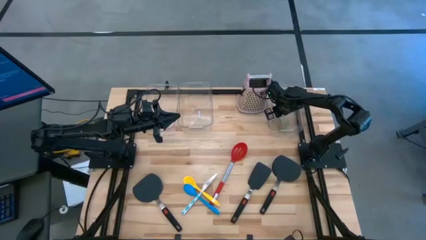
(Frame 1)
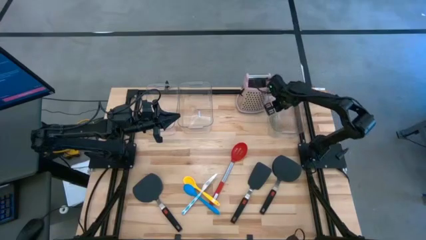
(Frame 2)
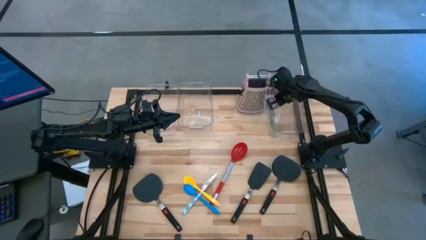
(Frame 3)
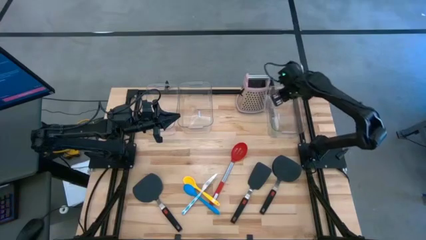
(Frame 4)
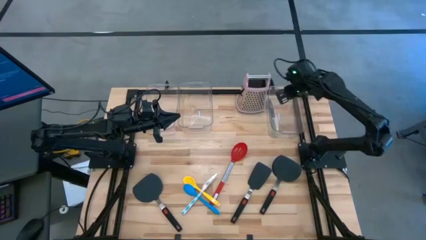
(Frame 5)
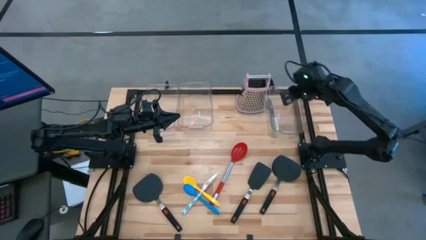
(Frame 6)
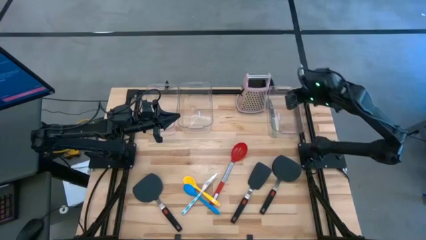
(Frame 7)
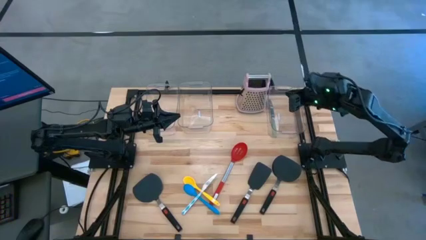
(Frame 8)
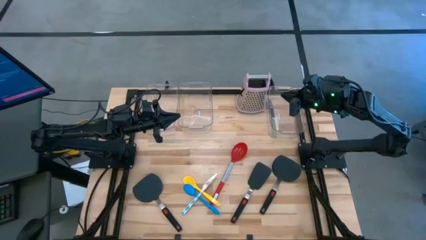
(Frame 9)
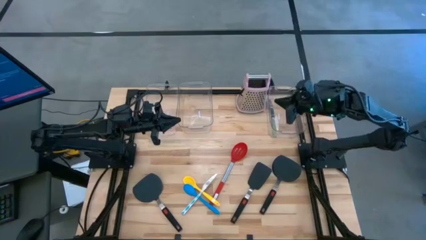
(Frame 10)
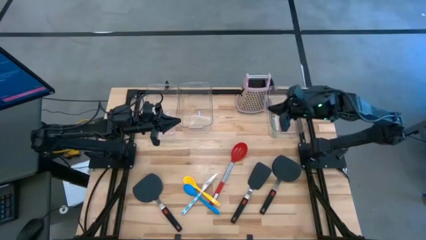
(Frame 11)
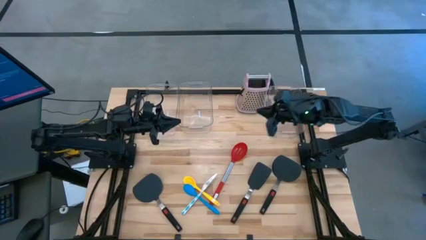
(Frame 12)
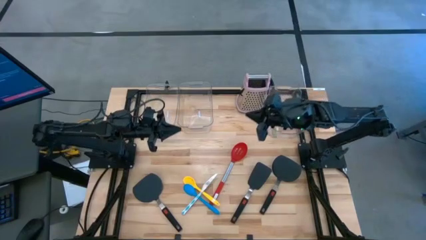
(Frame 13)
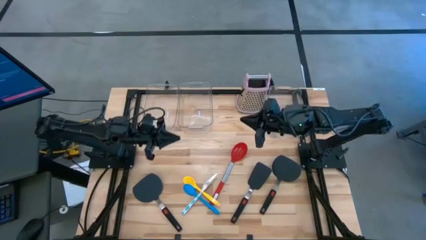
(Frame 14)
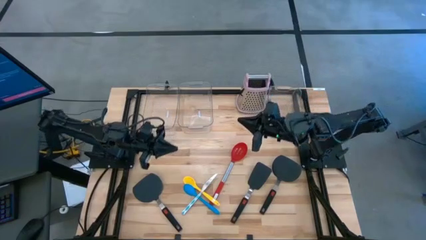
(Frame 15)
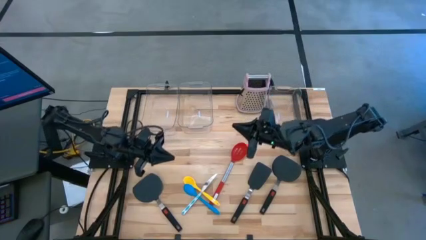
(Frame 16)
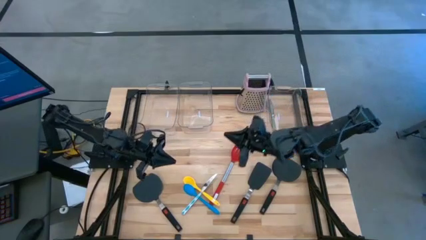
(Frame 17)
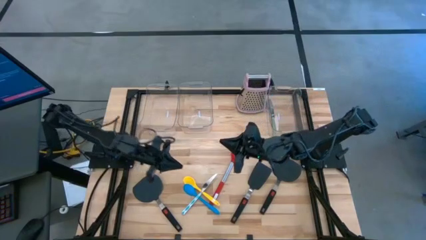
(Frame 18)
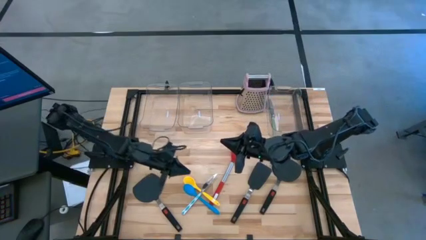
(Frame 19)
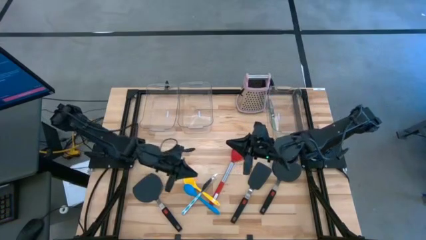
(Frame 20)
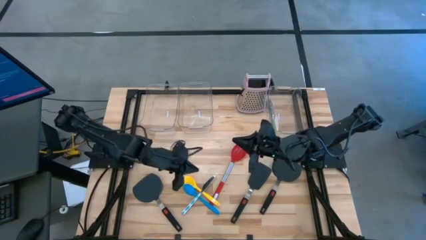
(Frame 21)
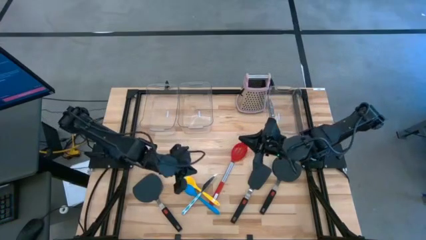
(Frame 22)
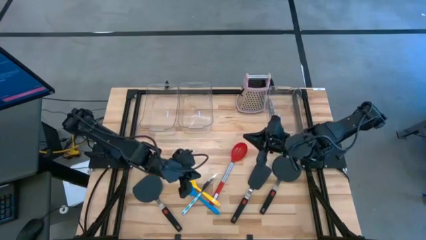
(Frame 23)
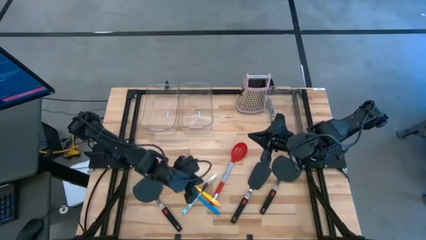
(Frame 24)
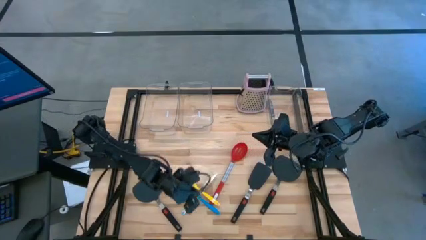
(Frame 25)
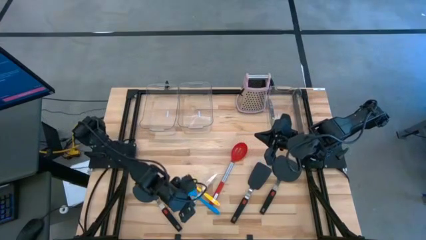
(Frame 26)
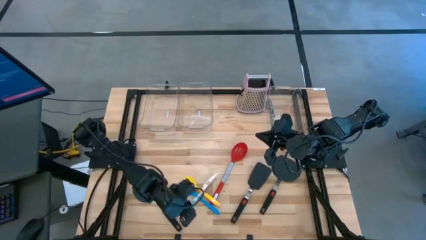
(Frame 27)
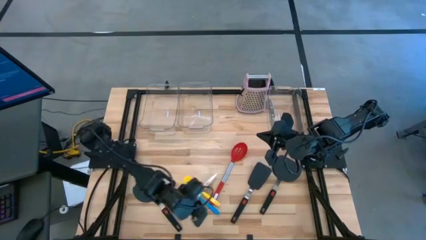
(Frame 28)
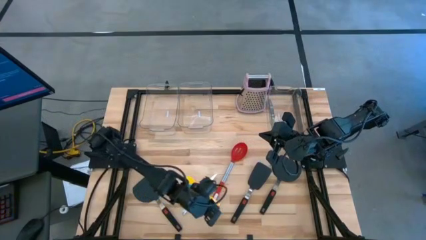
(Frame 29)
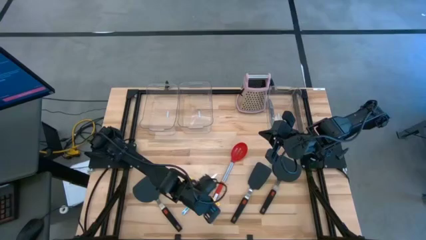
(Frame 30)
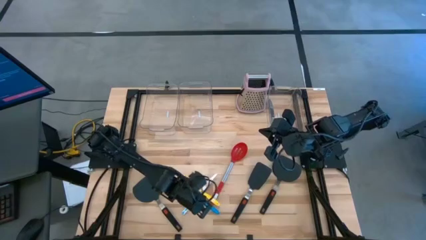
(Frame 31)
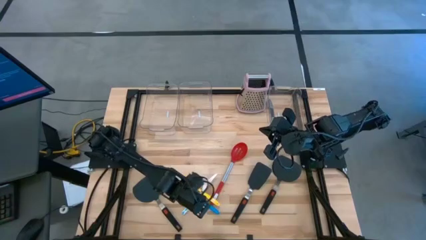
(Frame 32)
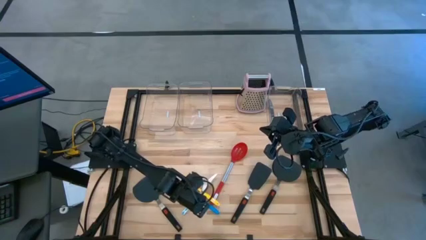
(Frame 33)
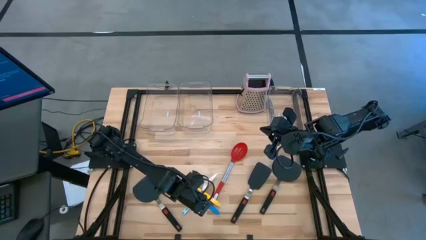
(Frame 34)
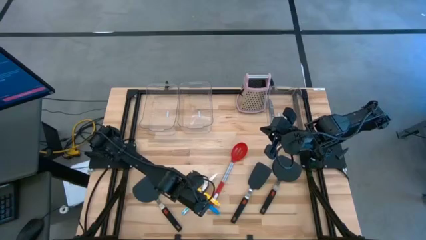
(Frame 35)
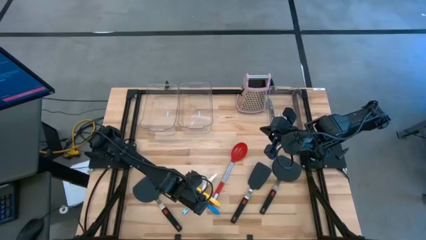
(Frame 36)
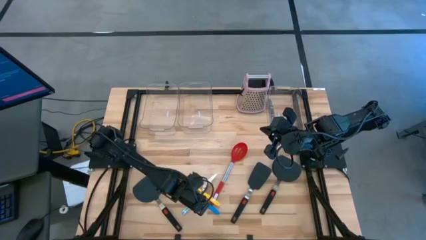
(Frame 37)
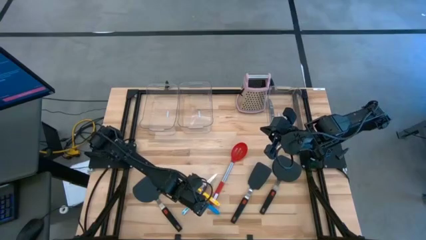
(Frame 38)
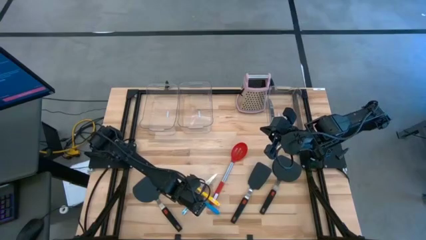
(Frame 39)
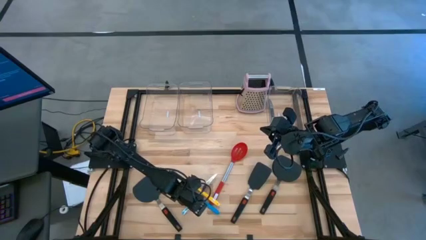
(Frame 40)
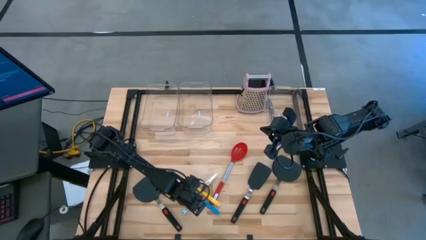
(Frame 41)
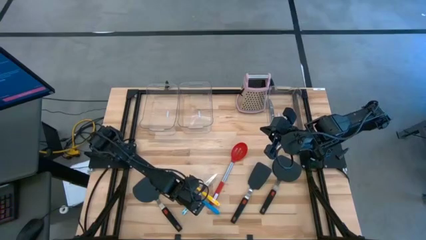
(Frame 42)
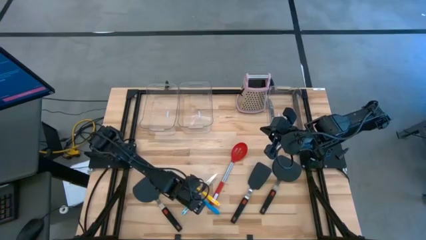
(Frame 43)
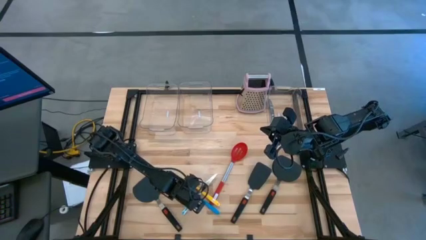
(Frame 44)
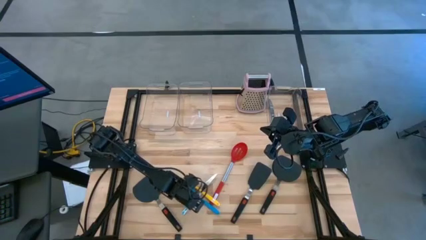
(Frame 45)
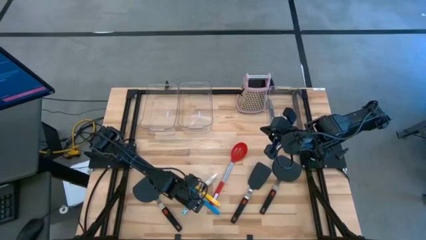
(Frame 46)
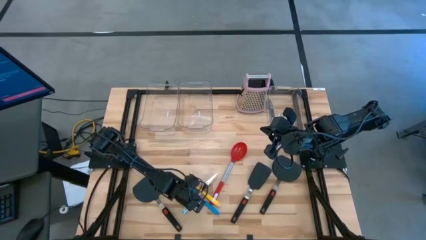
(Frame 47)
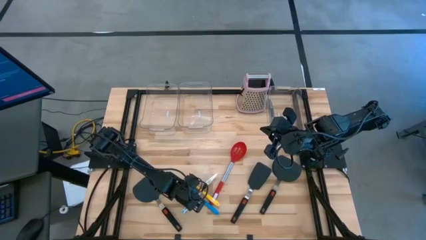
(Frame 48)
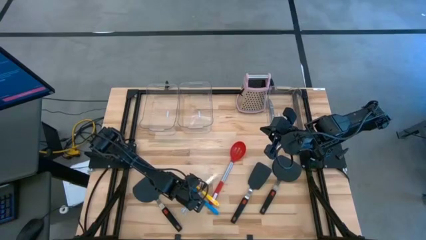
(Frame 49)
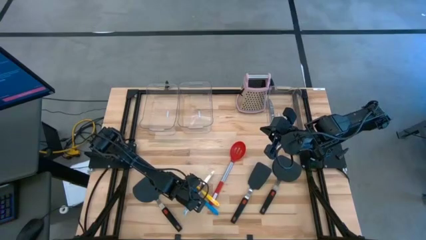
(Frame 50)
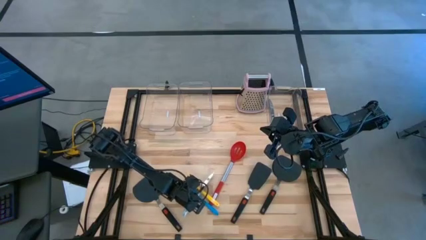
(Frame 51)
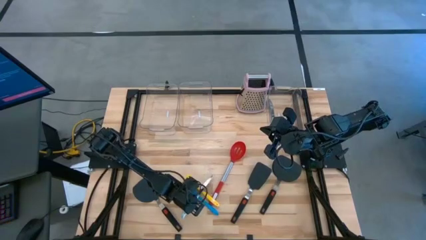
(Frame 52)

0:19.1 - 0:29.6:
Task: Pick & Place Kitchen Items
Put the blue table knife into the right transparent bin
